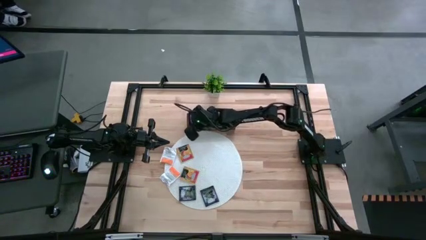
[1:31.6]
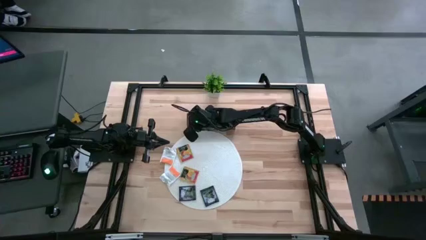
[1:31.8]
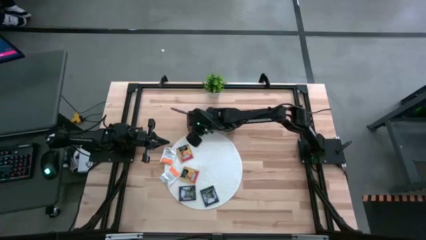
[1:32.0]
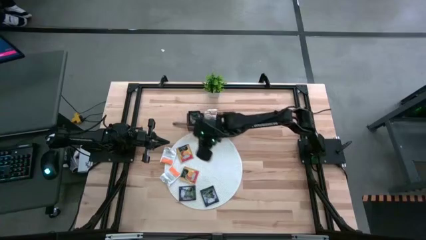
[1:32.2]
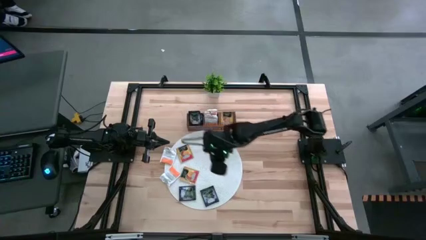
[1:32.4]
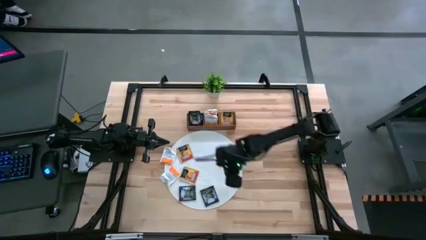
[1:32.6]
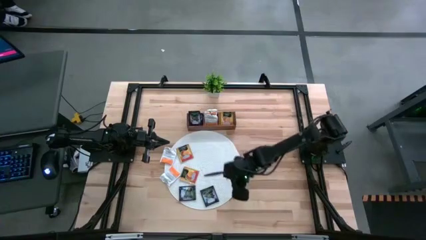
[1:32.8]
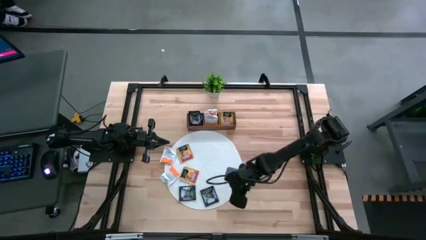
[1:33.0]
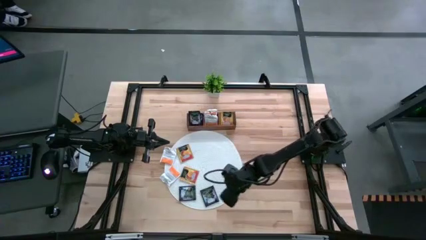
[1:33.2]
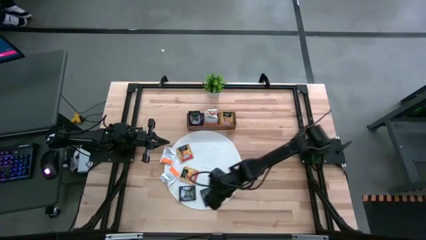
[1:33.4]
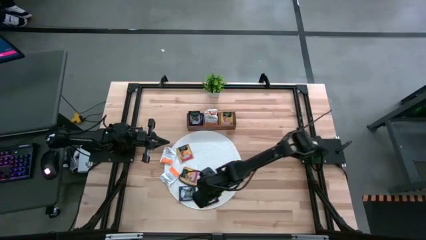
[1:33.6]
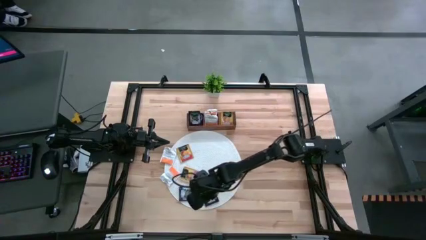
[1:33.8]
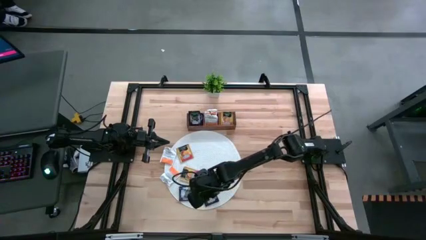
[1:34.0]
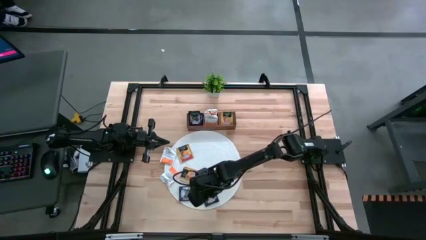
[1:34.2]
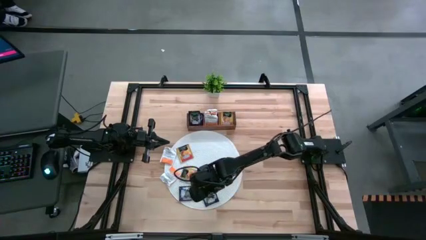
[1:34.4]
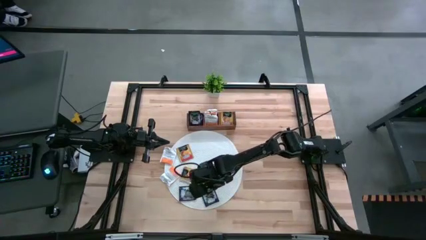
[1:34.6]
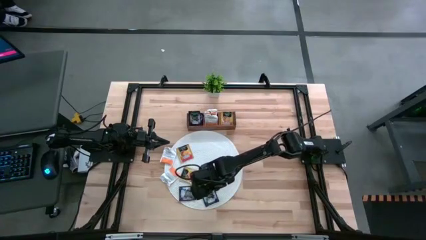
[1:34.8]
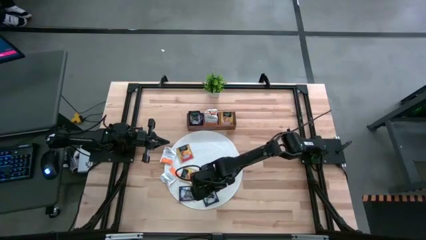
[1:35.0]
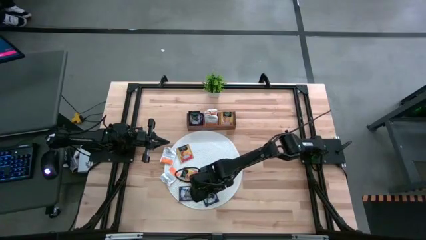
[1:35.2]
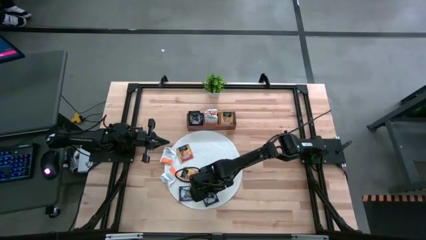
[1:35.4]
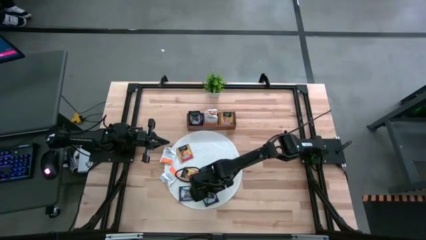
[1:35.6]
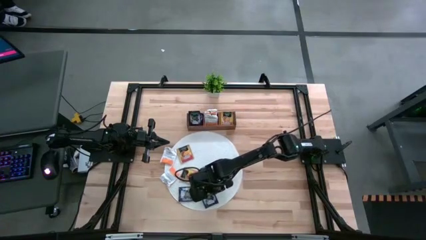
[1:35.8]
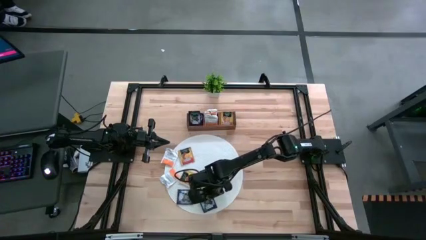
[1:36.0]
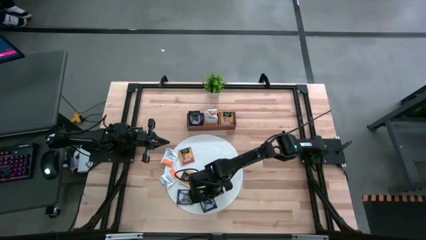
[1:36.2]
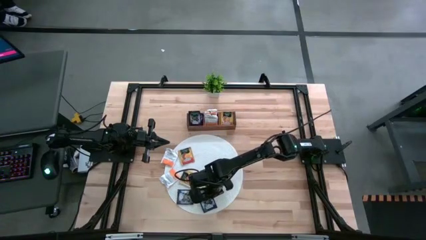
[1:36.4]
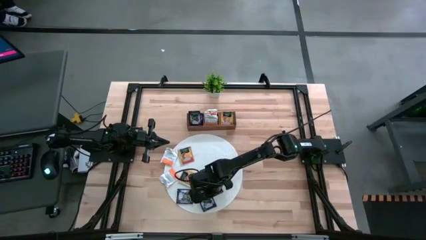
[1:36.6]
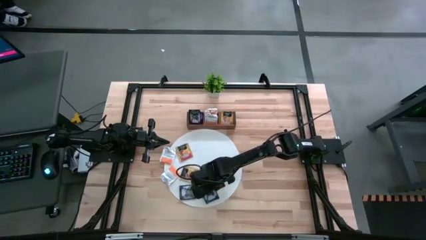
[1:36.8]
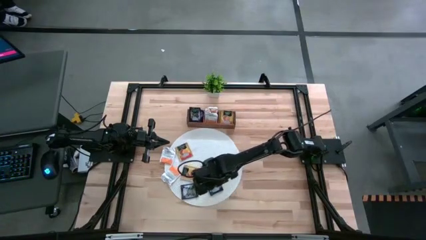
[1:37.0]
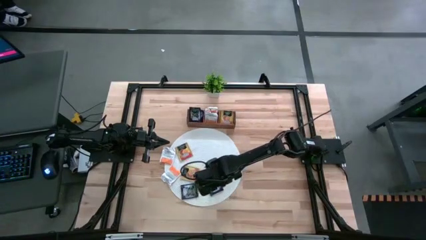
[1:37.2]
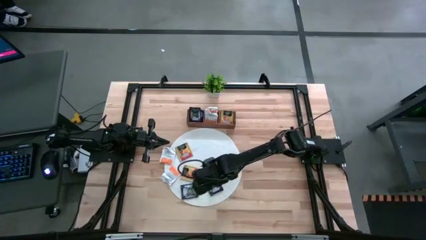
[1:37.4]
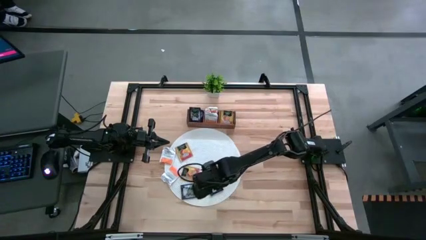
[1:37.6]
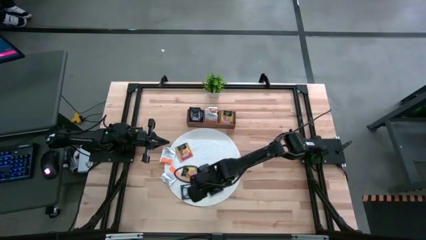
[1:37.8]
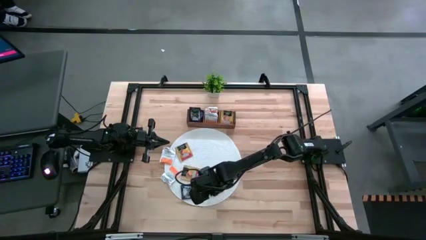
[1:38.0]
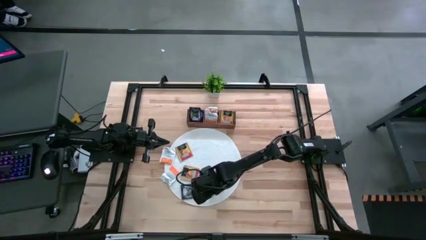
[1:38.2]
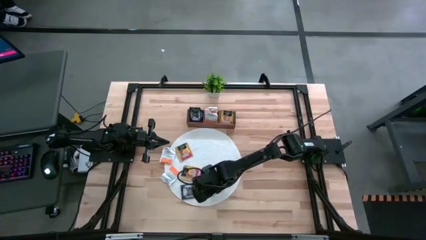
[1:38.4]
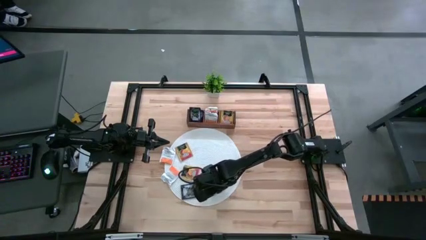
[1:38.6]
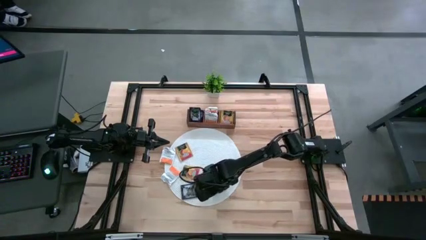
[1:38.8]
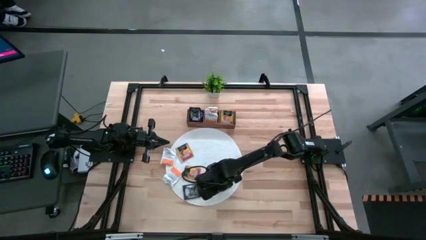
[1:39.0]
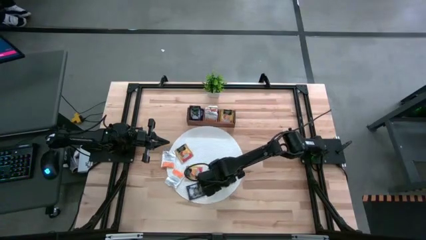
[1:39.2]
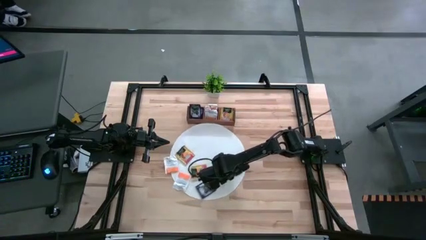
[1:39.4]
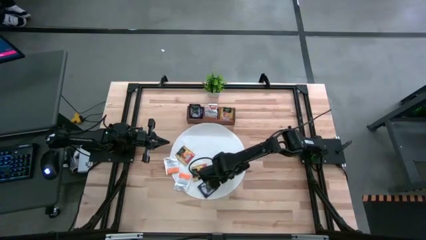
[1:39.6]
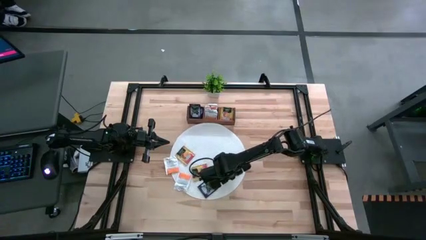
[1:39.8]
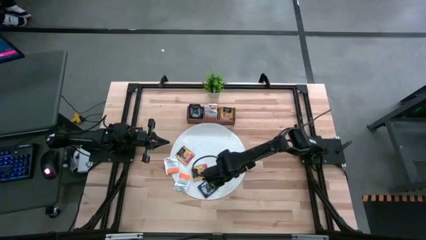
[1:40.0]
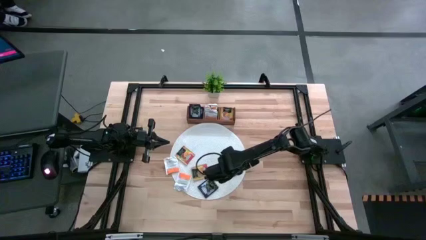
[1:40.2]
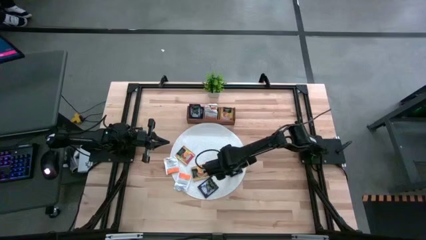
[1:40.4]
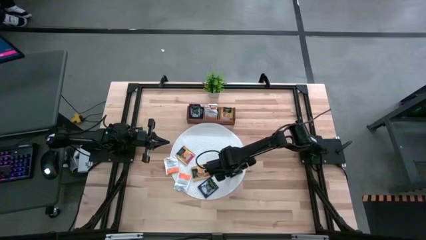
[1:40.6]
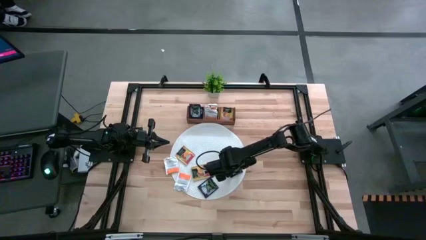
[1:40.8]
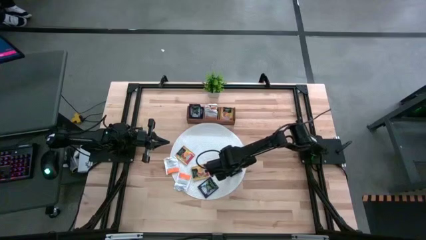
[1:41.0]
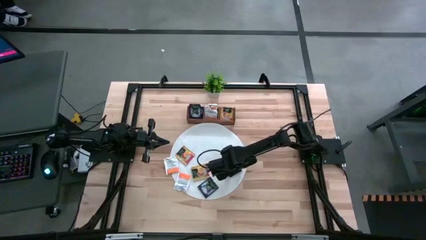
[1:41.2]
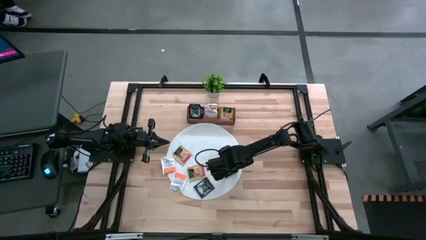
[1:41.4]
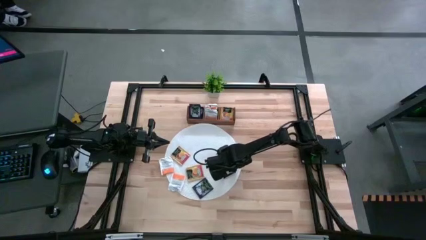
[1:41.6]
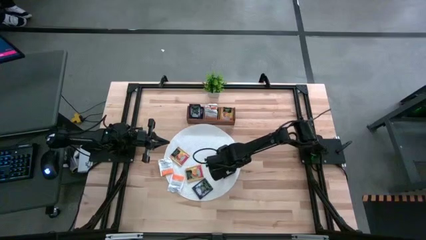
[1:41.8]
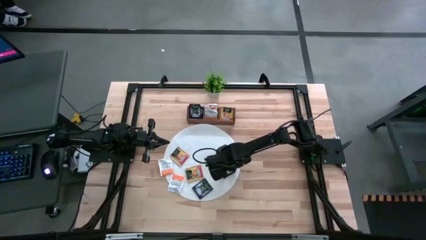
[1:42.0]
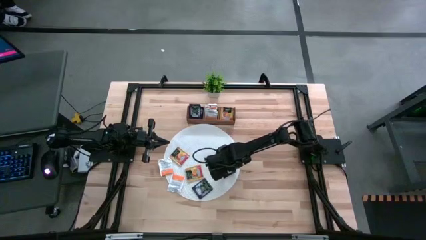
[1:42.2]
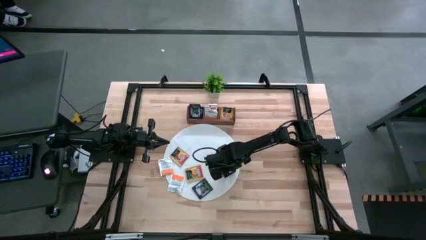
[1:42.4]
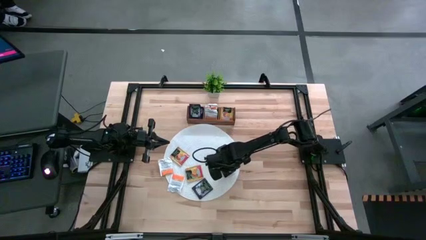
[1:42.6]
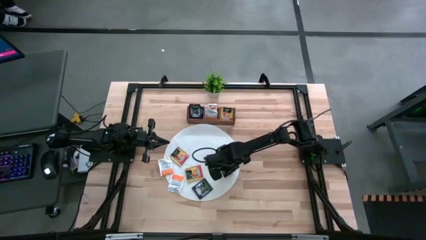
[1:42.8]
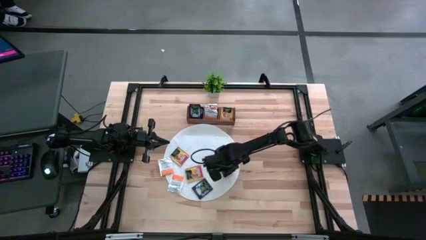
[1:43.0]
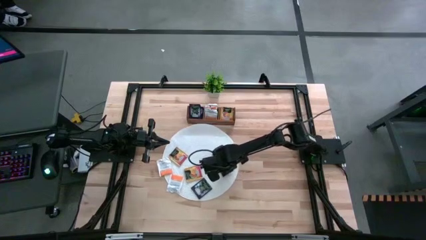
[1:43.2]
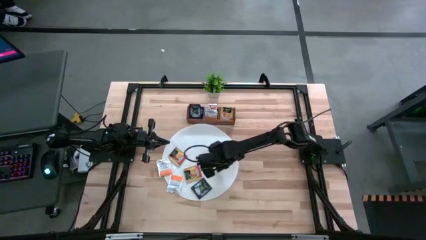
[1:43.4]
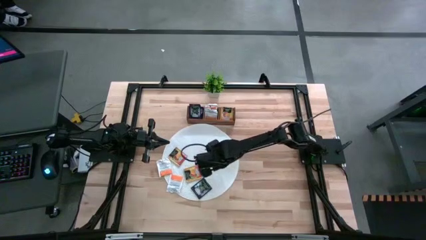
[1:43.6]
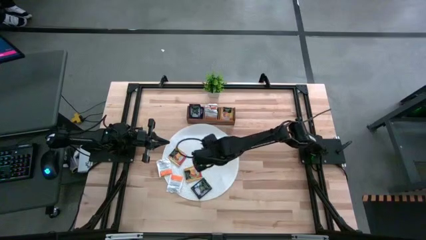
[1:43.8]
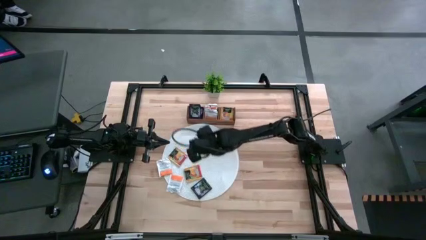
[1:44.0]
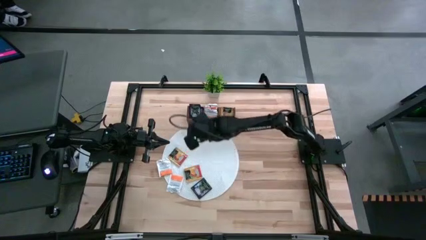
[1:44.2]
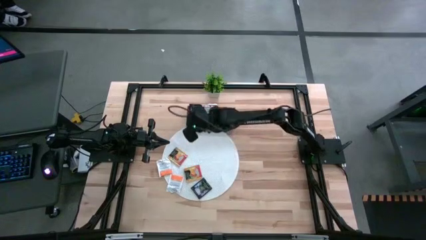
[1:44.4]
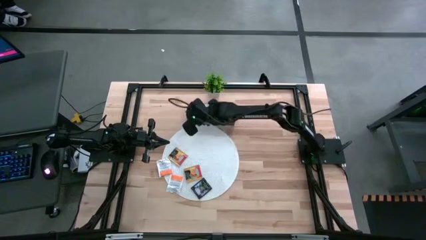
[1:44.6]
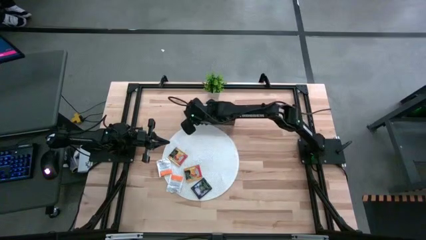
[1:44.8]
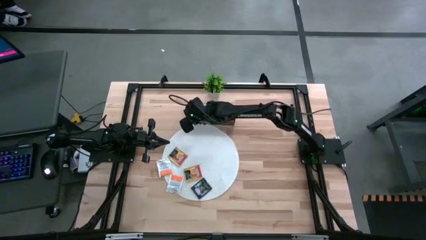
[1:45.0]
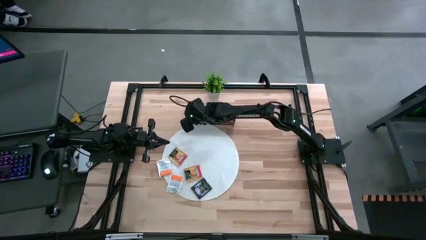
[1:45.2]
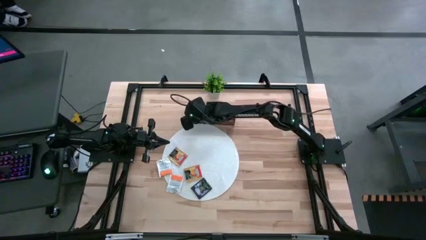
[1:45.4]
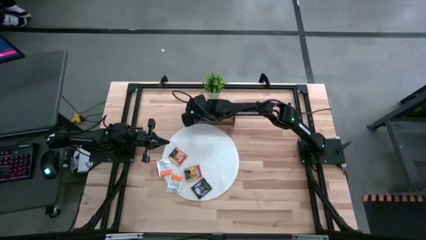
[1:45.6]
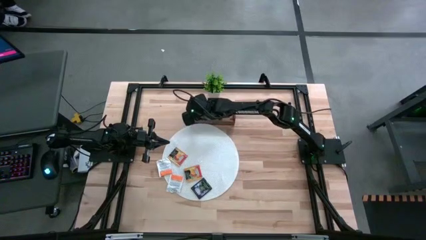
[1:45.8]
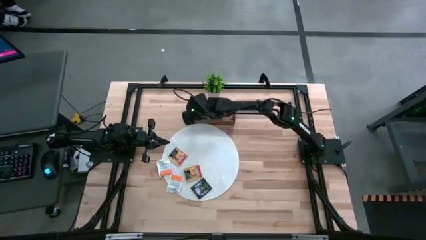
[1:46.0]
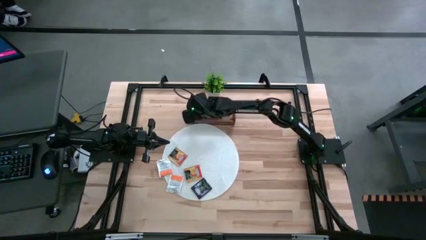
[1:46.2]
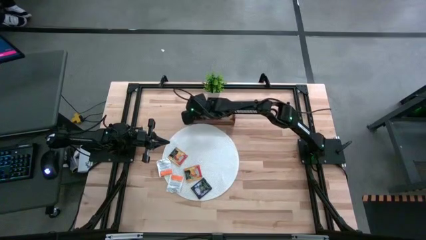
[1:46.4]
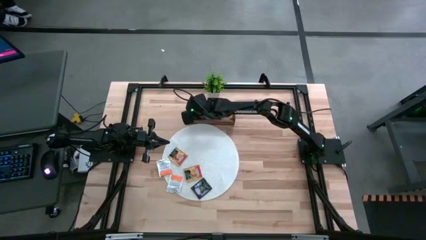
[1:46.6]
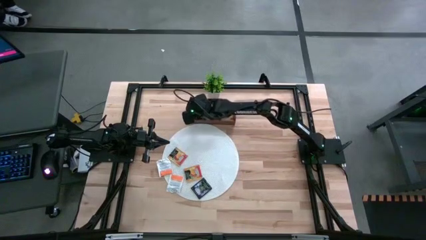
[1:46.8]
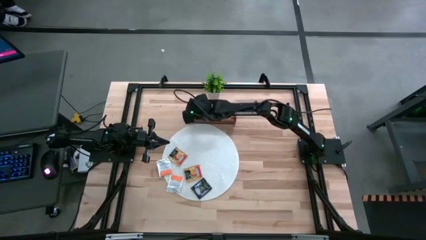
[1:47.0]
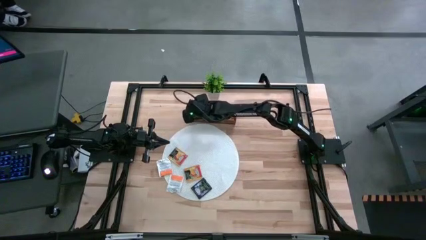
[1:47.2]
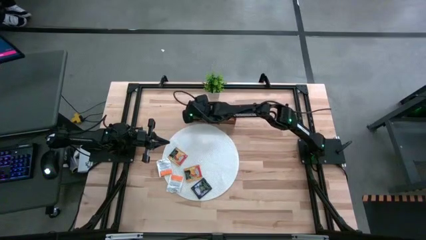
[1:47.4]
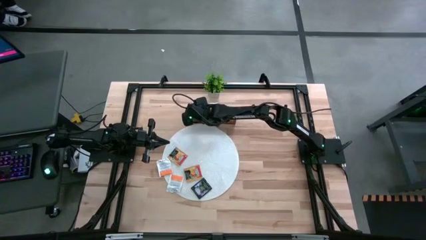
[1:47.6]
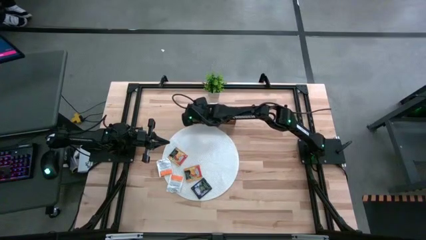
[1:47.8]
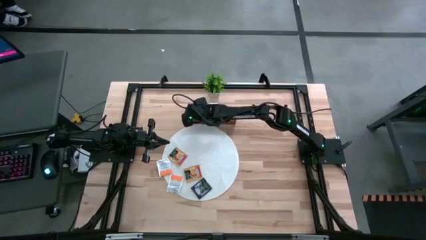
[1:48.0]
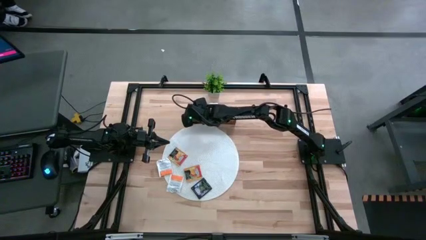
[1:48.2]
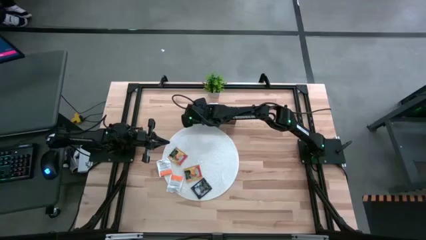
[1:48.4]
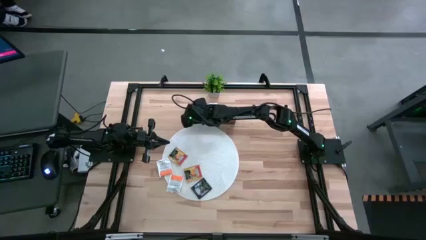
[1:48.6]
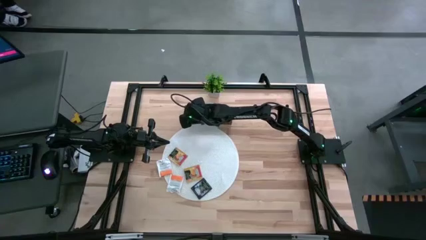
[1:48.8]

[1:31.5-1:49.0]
Task: Pick & Place Tea
Put the dark purple tea bag into the left section of the wooden organizer
